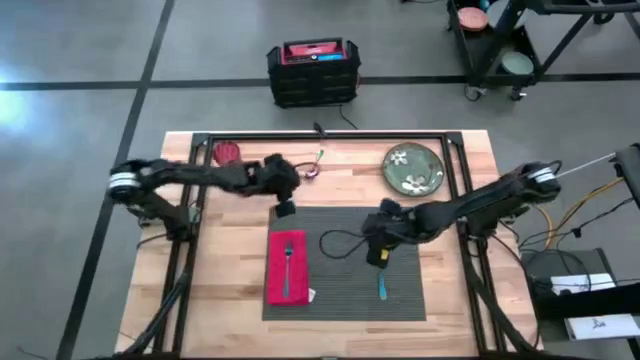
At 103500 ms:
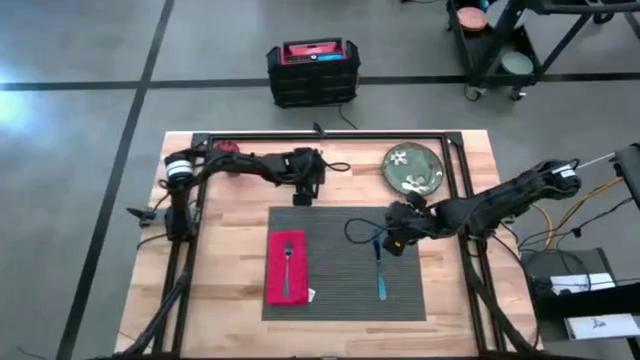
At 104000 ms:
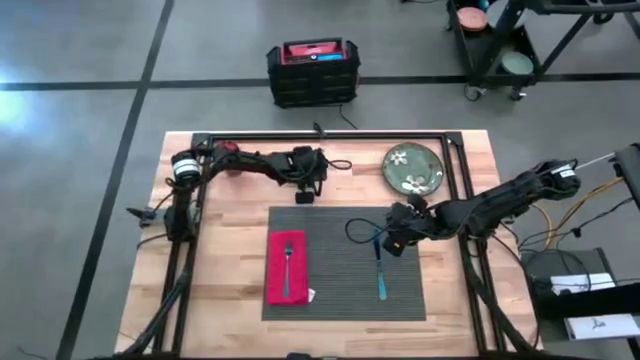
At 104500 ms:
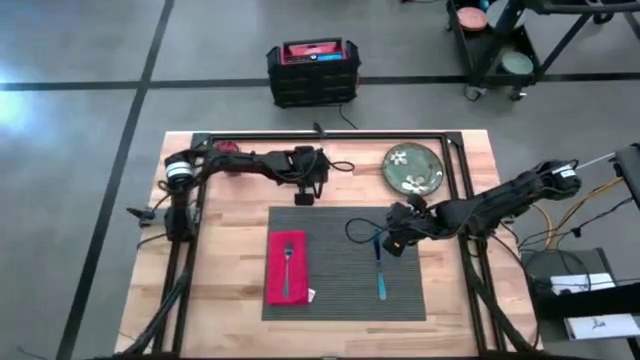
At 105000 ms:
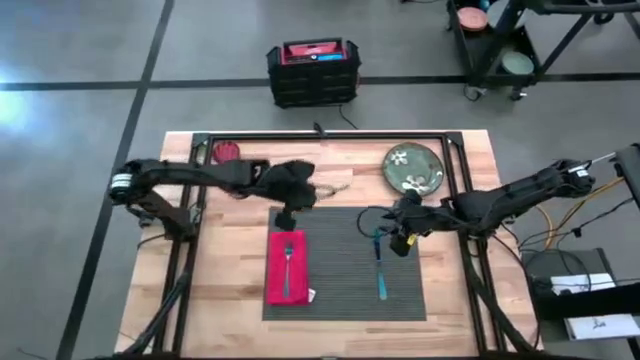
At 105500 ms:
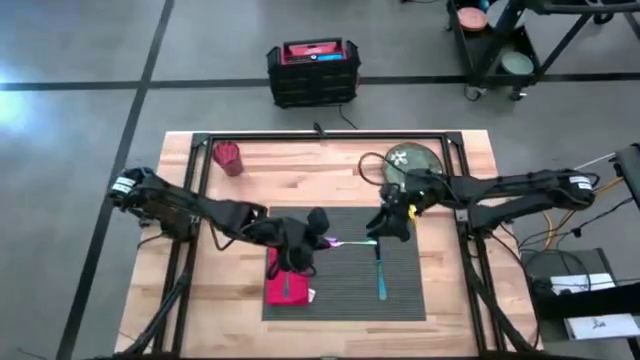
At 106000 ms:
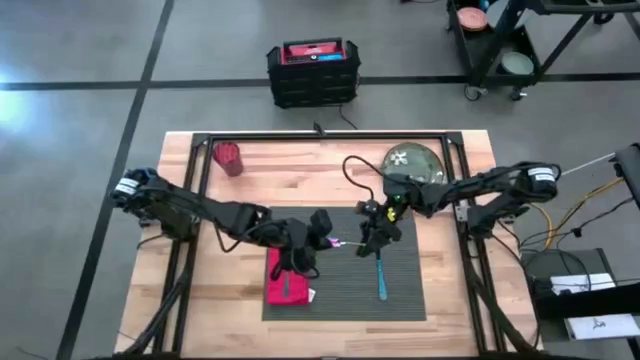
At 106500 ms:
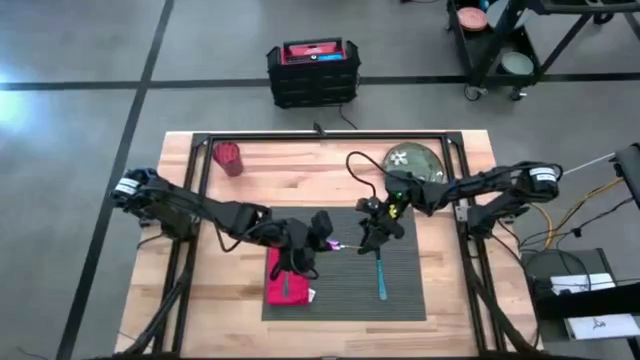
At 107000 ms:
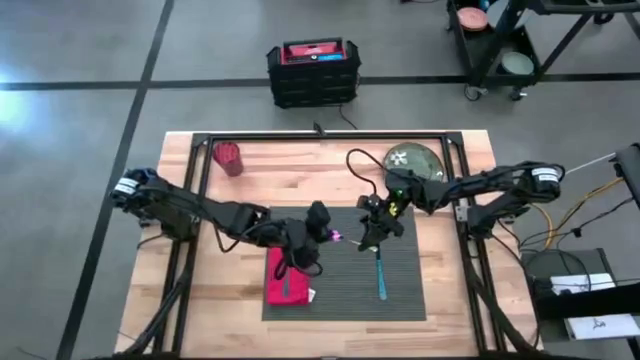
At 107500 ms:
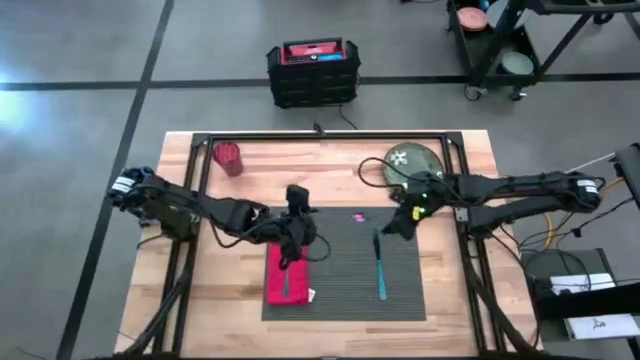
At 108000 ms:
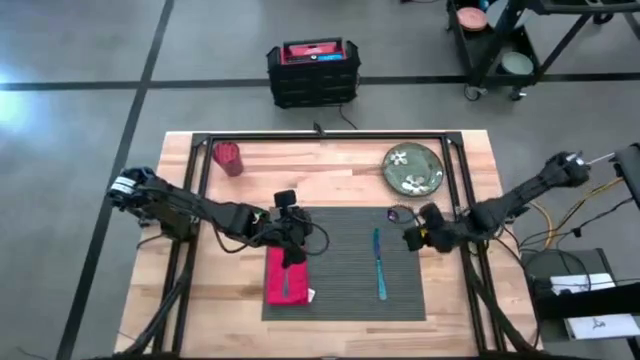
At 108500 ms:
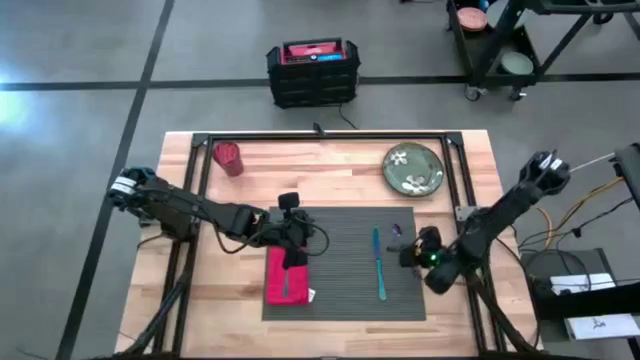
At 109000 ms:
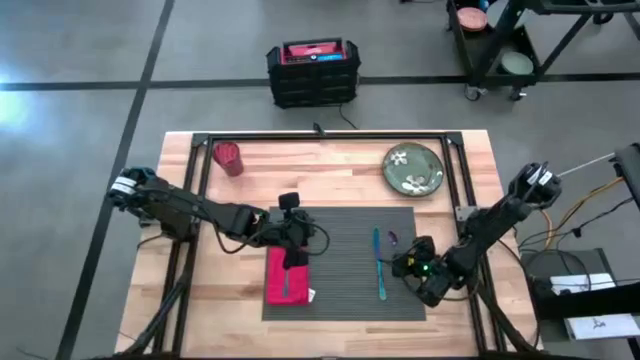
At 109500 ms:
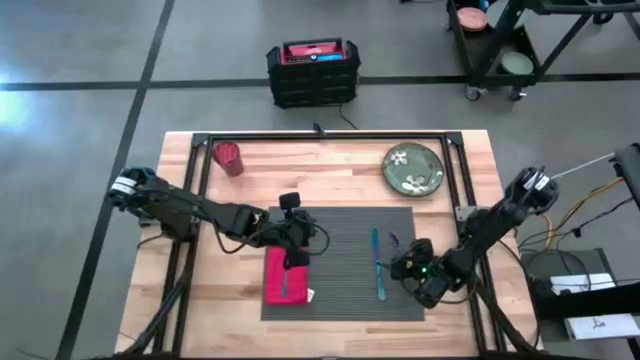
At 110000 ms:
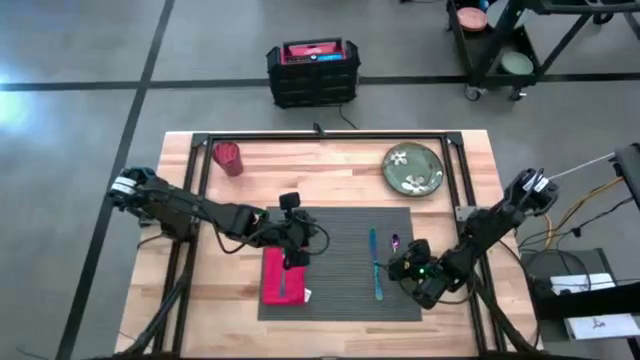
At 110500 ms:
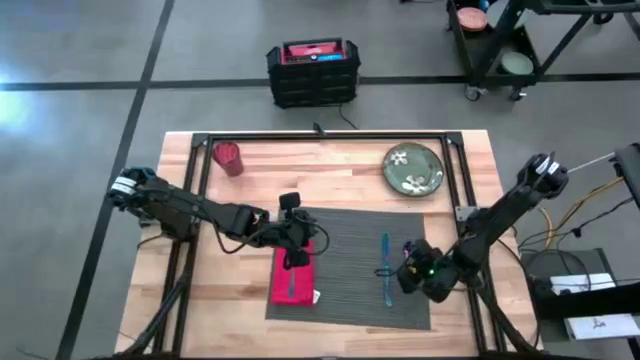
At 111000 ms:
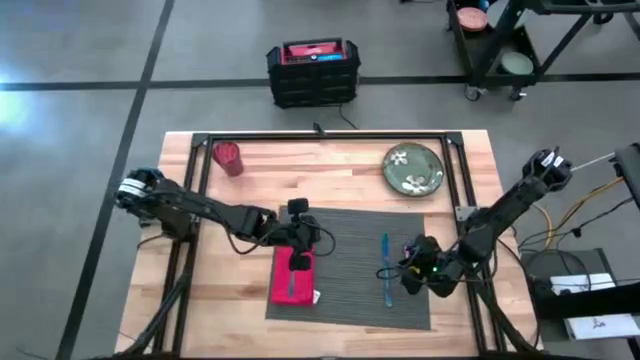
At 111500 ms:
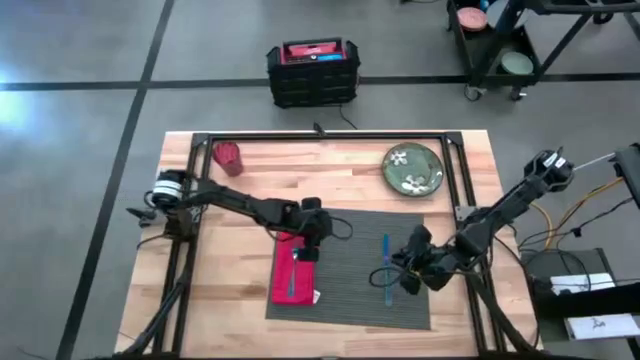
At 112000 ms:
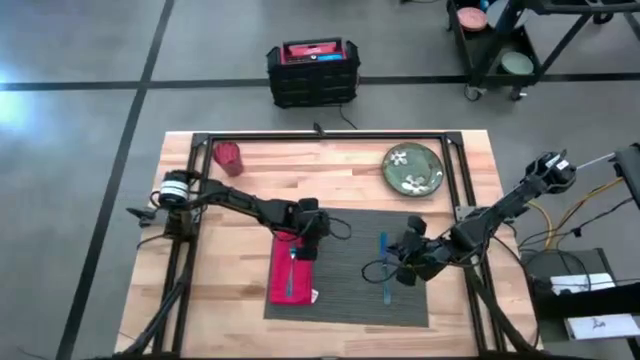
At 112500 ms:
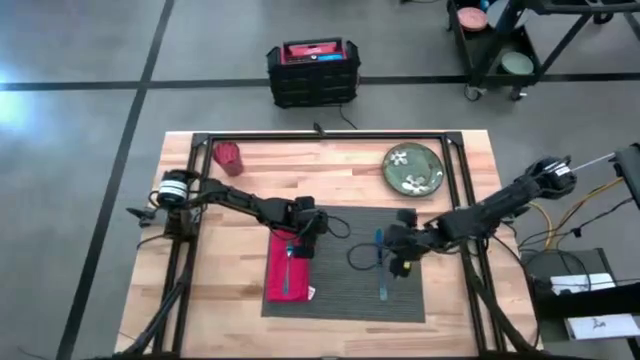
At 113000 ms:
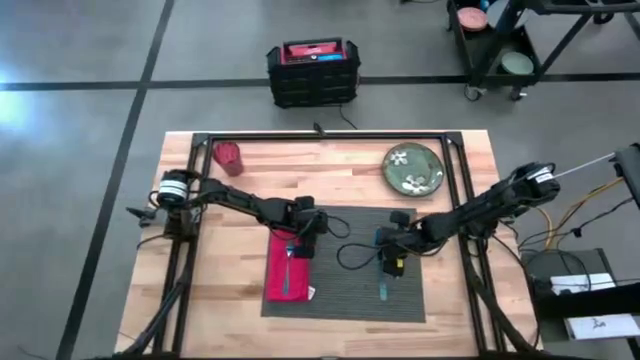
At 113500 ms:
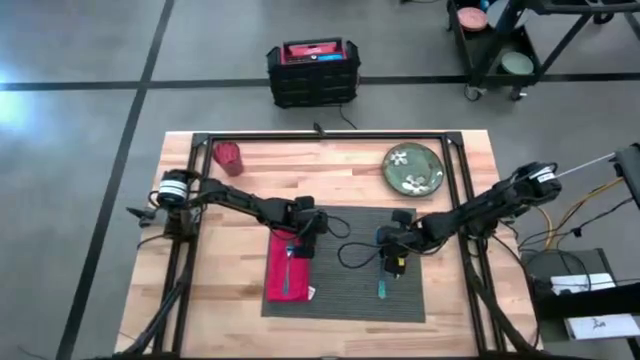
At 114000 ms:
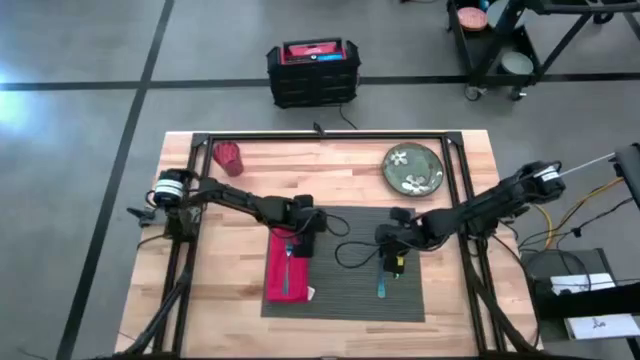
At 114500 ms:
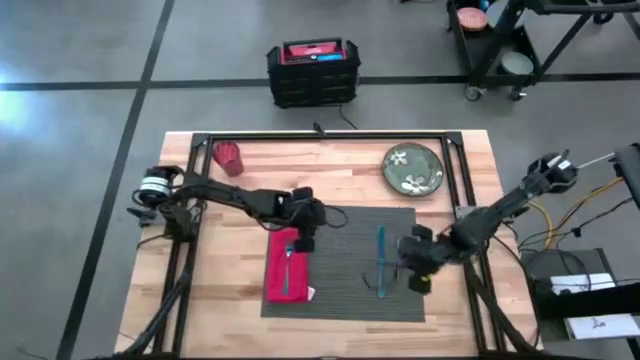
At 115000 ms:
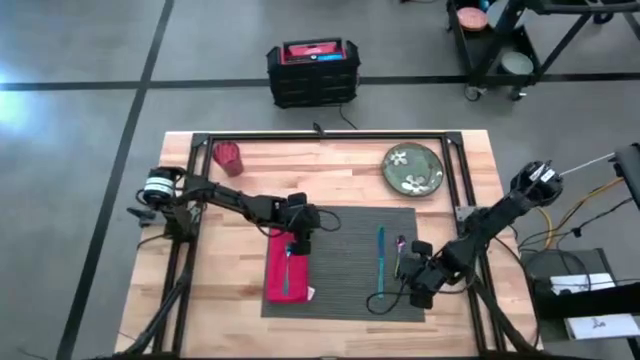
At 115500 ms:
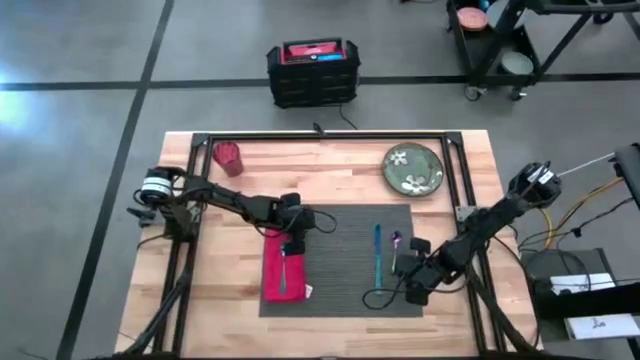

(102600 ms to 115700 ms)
Task: Set table place
Put the blue spoon on the gray table mat to the right of the blue knife

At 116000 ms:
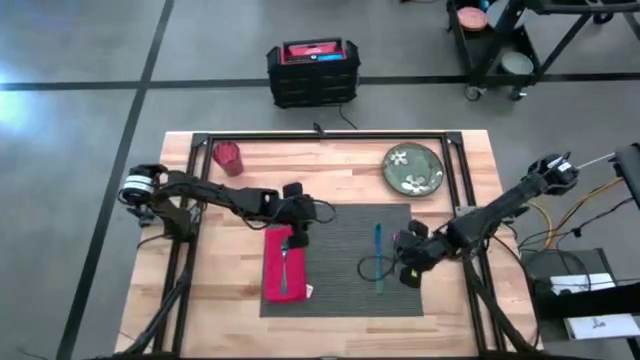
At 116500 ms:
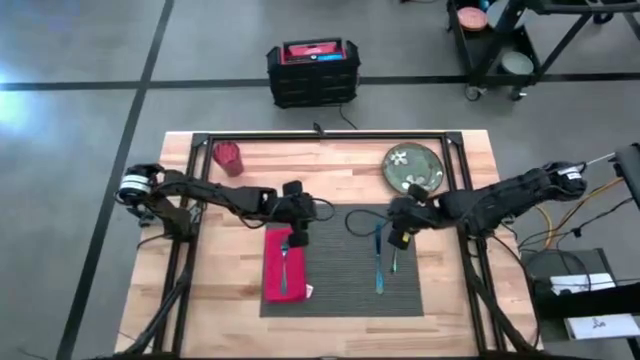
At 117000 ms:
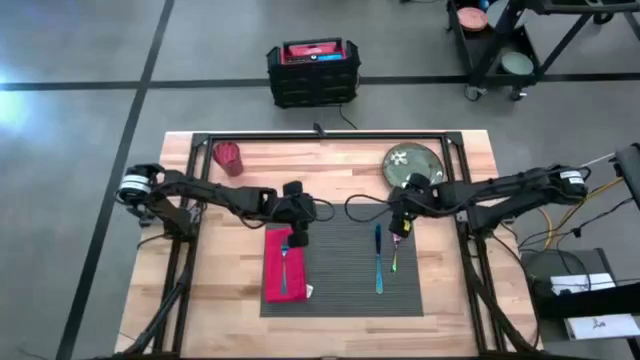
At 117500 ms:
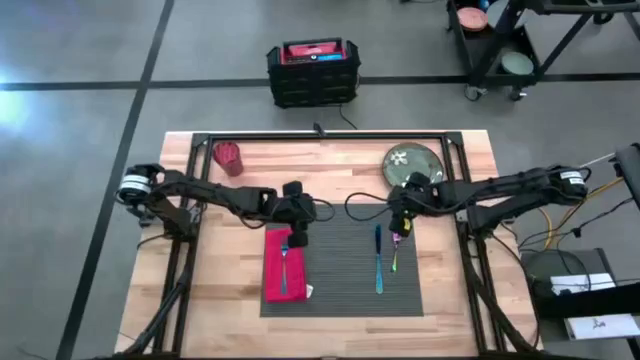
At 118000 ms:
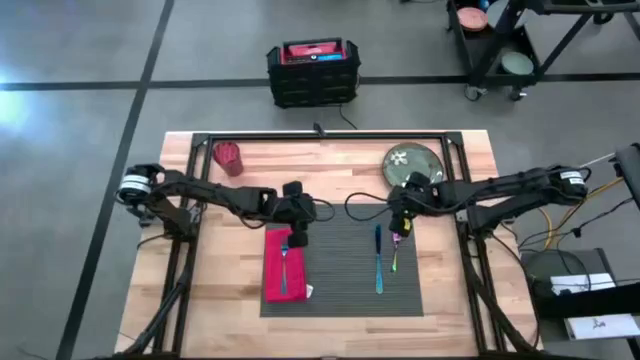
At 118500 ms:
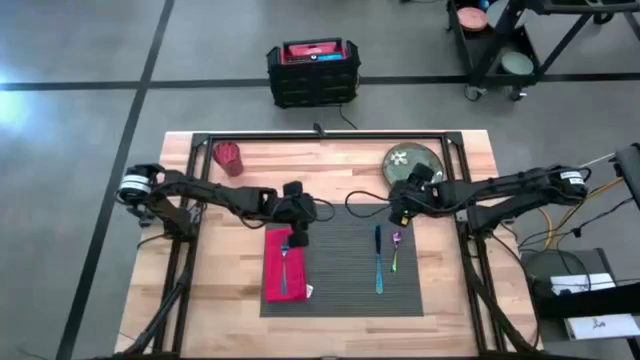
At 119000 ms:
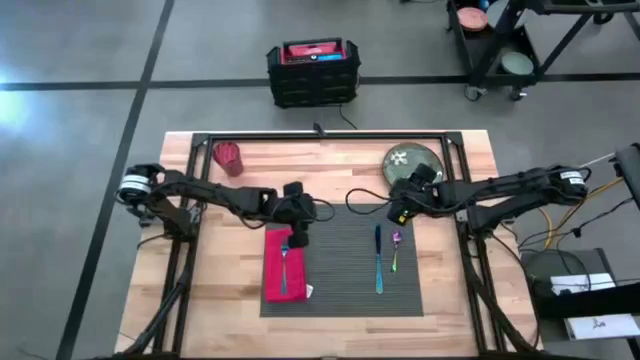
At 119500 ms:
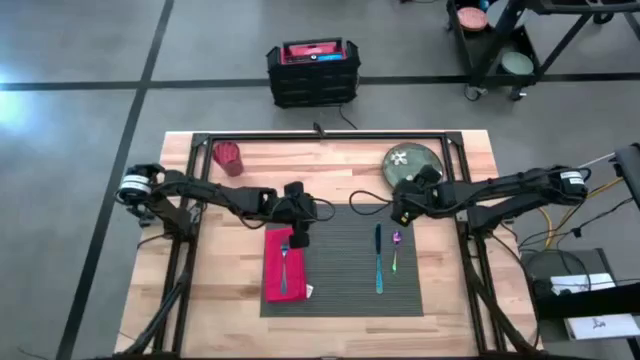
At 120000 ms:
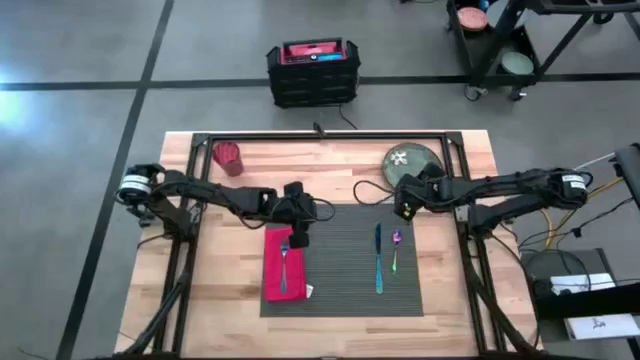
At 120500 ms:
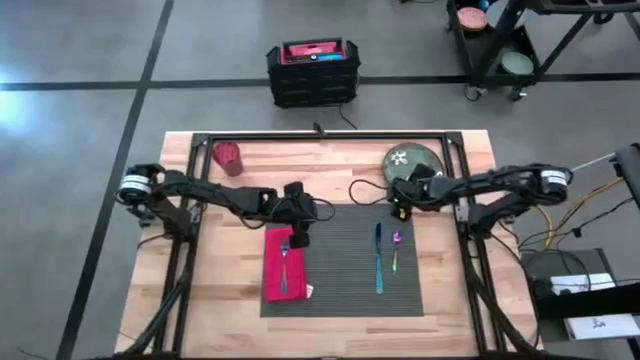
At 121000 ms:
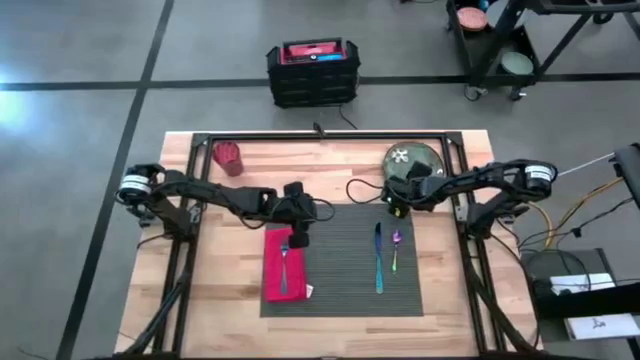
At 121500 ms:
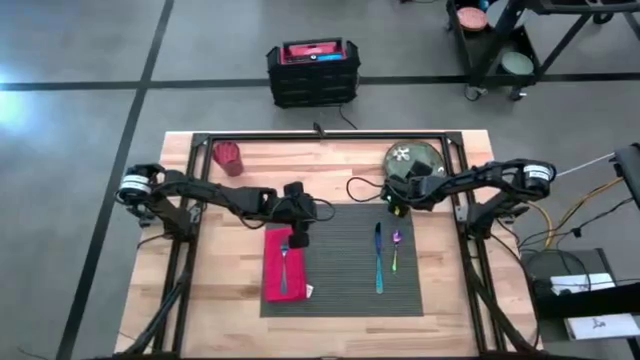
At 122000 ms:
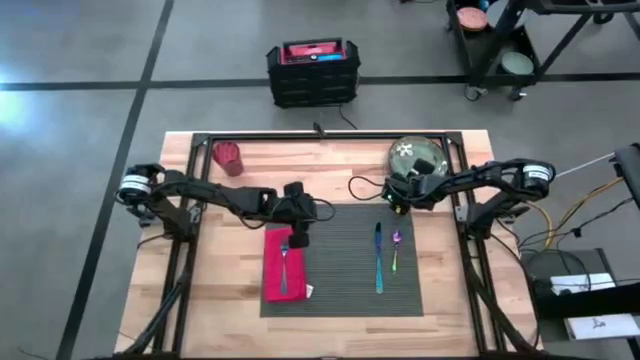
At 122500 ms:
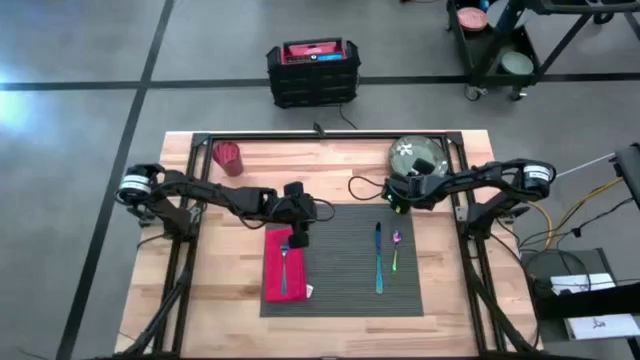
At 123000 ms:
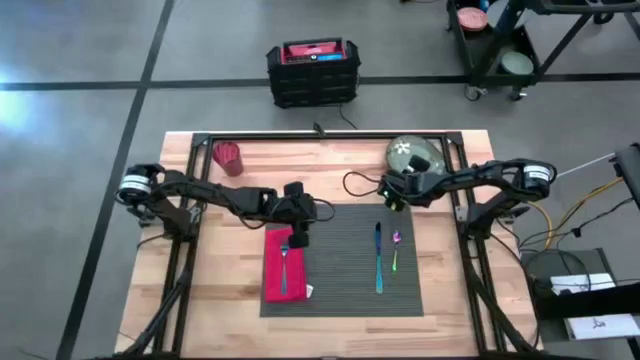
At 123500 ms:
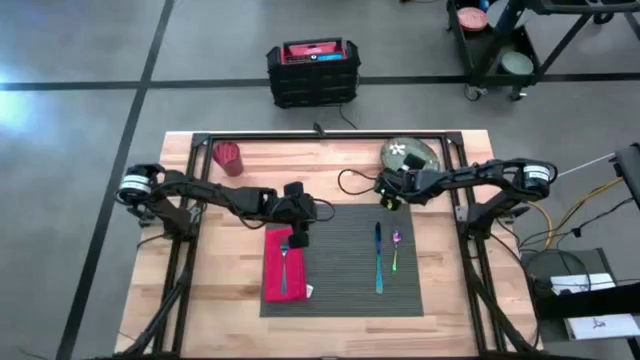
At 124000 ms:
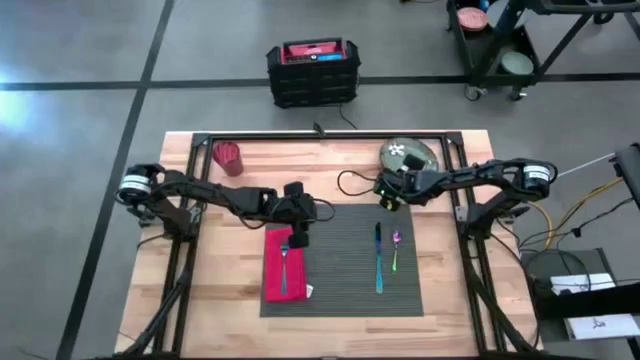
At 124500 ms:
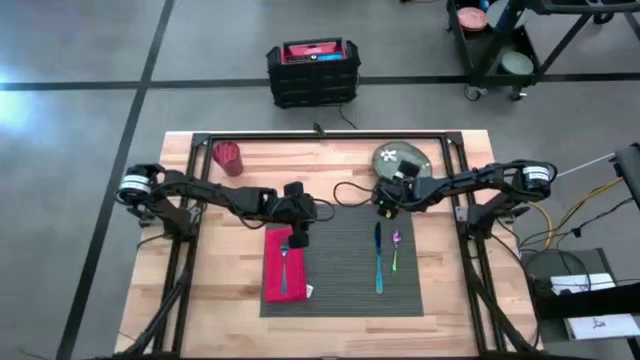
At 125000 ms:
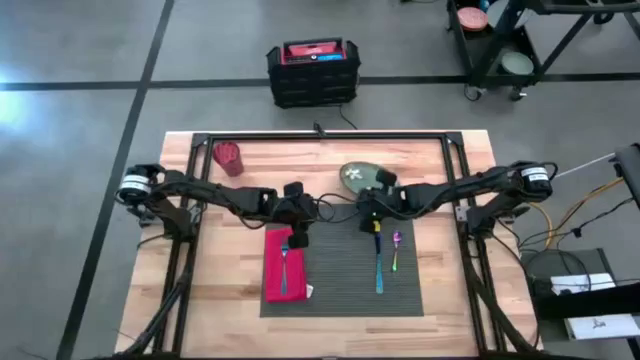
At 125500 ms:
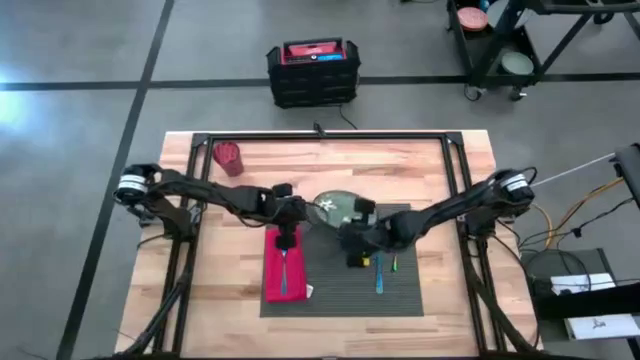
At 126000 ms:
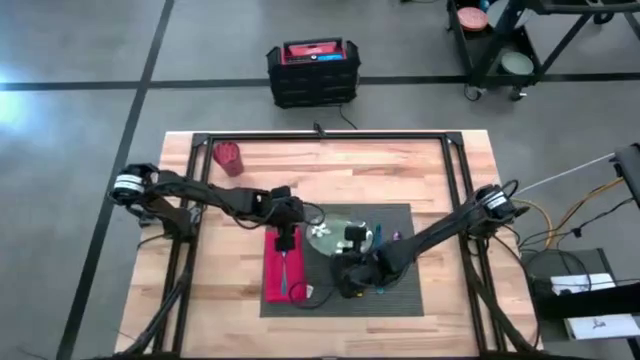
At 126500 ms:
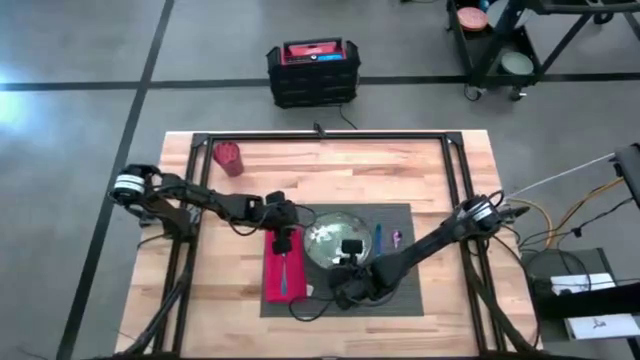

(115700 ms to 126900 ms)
Put the green plate on the center of the gray table mat
